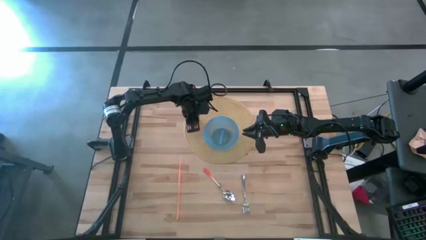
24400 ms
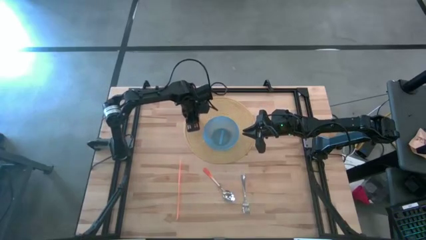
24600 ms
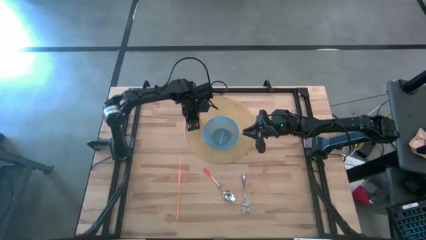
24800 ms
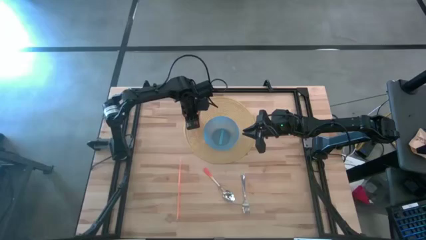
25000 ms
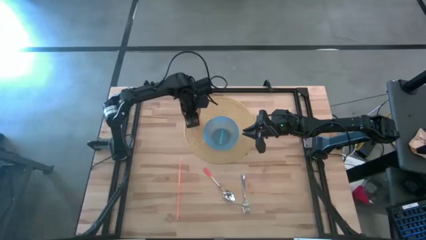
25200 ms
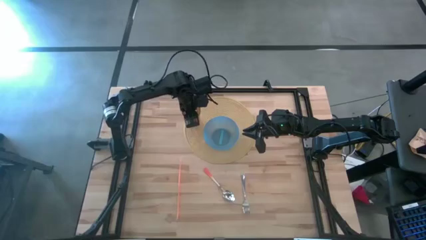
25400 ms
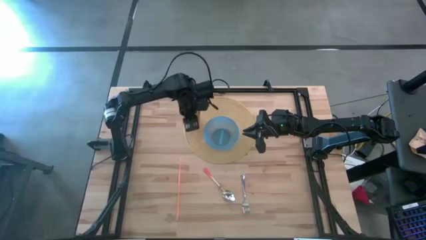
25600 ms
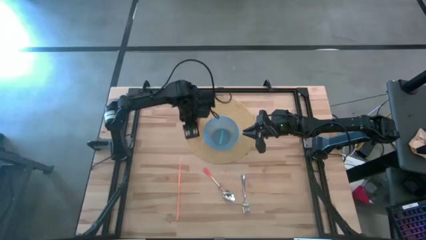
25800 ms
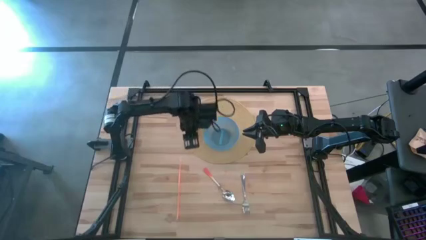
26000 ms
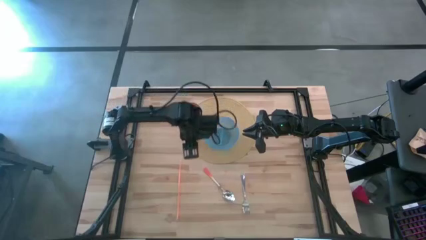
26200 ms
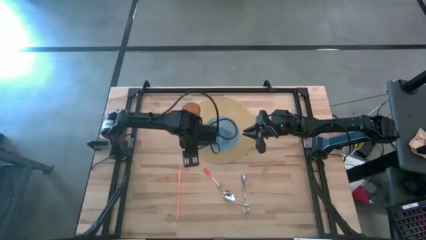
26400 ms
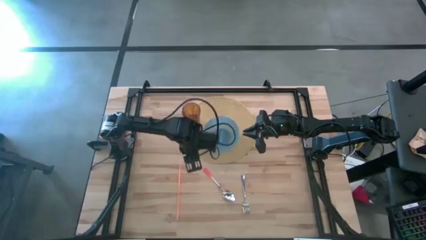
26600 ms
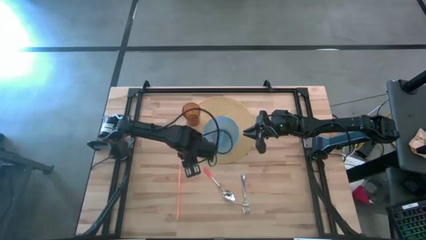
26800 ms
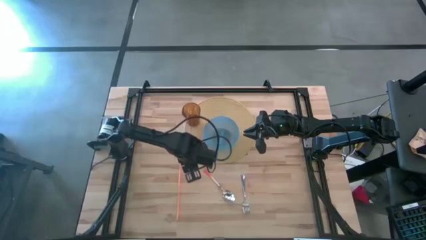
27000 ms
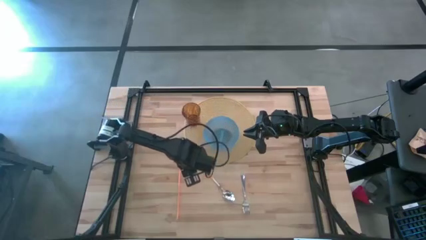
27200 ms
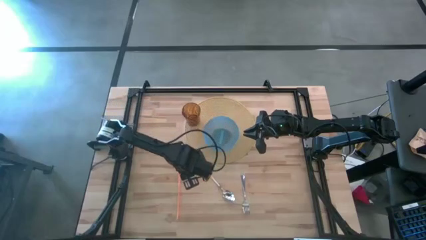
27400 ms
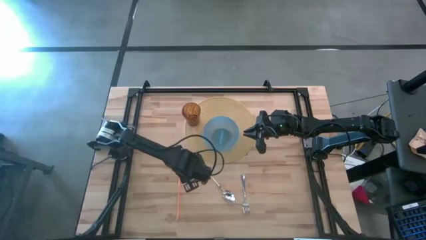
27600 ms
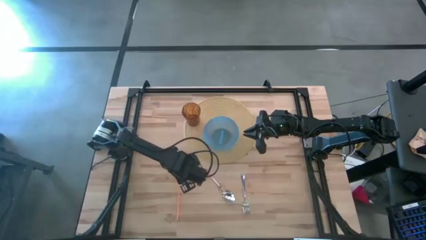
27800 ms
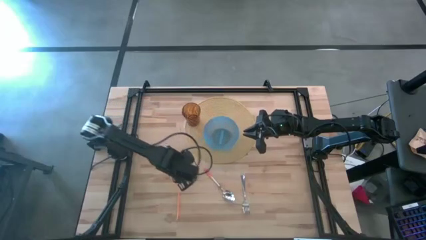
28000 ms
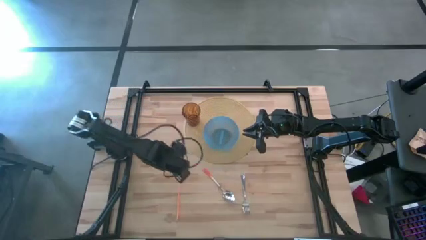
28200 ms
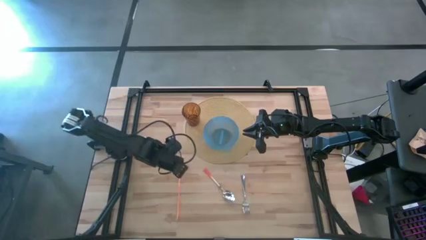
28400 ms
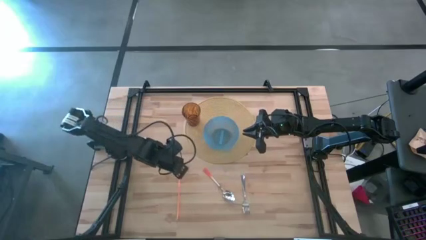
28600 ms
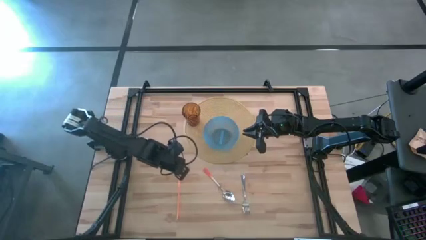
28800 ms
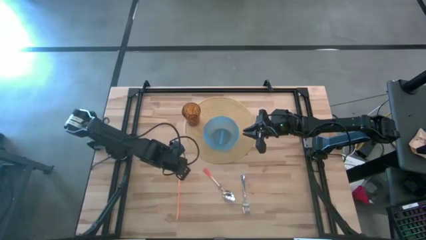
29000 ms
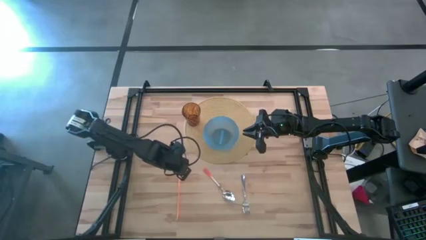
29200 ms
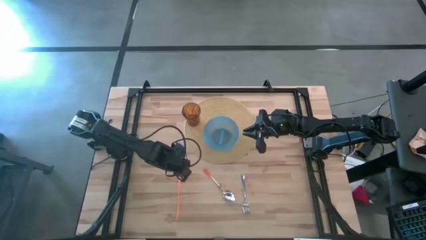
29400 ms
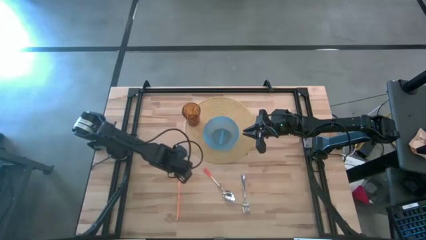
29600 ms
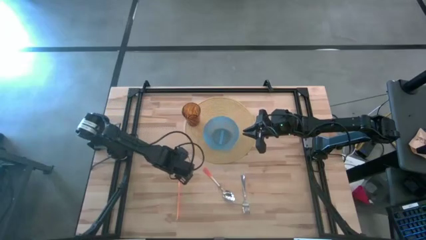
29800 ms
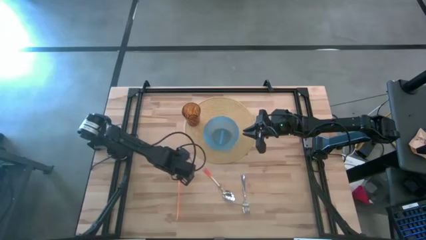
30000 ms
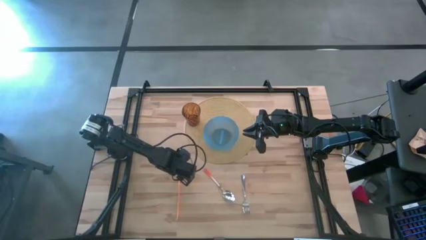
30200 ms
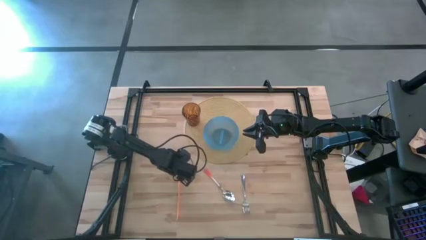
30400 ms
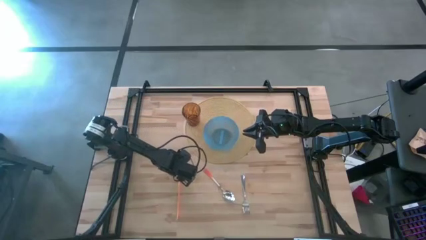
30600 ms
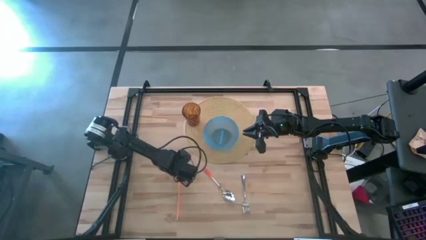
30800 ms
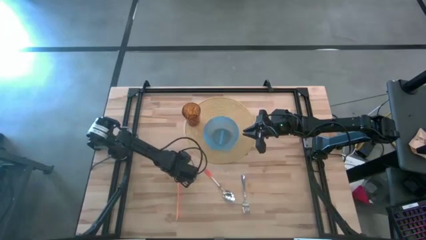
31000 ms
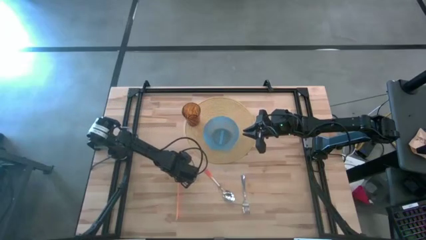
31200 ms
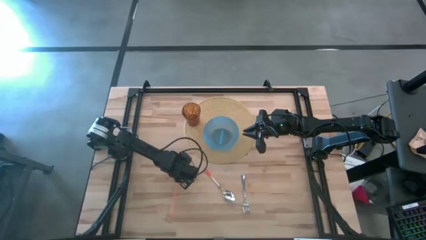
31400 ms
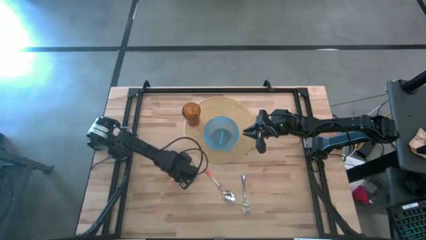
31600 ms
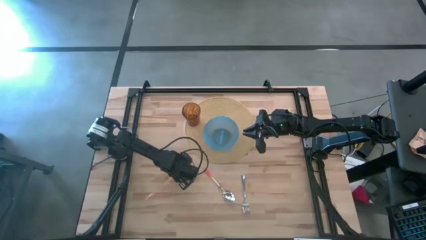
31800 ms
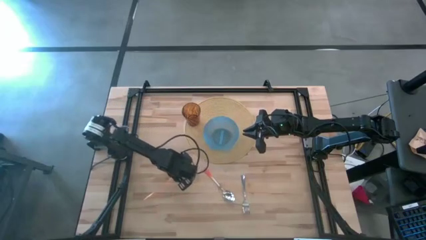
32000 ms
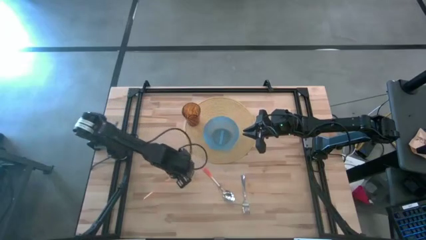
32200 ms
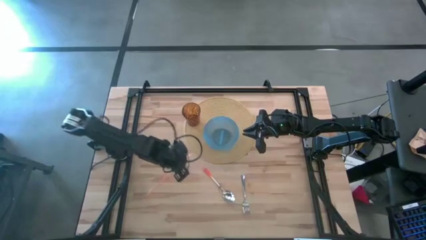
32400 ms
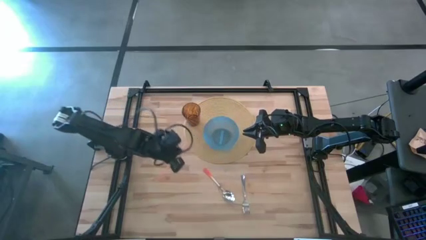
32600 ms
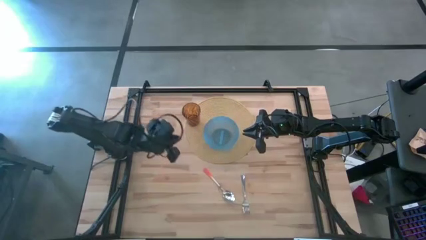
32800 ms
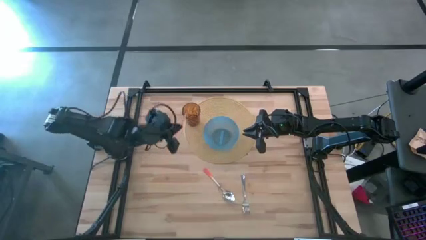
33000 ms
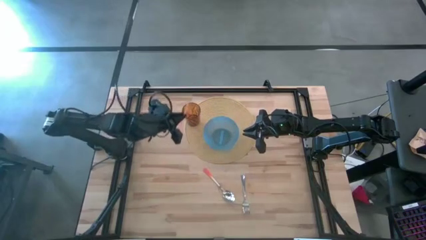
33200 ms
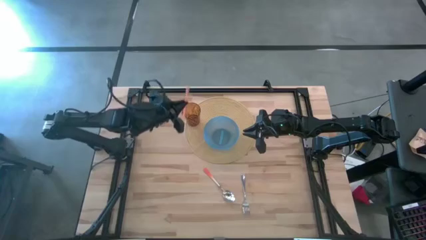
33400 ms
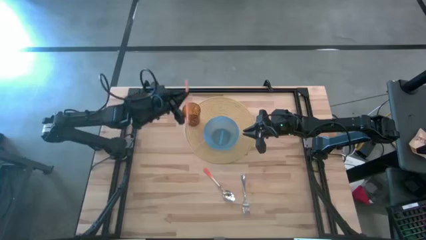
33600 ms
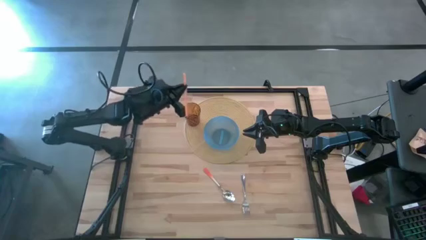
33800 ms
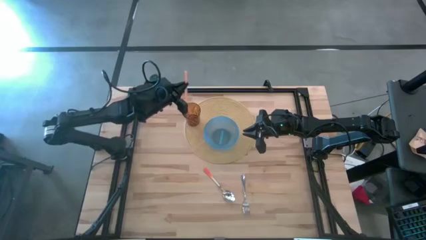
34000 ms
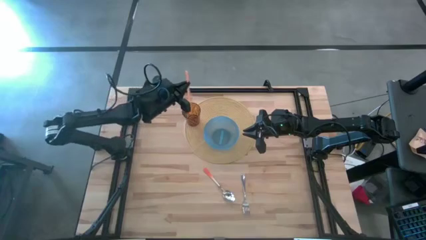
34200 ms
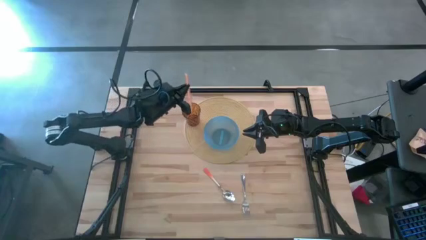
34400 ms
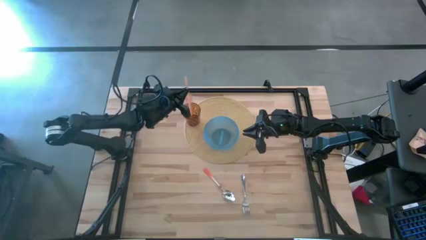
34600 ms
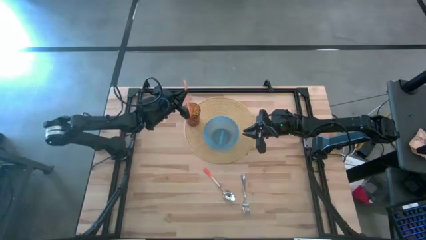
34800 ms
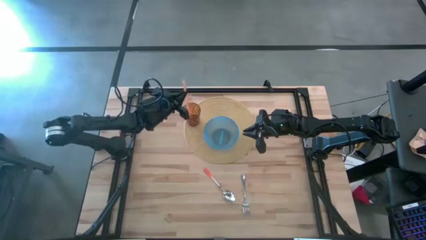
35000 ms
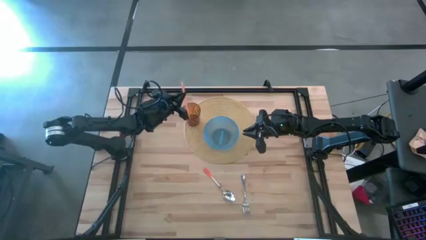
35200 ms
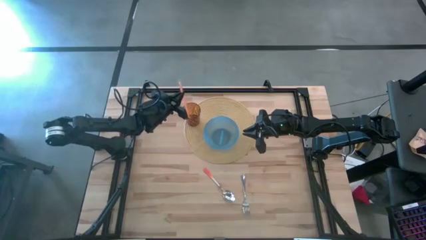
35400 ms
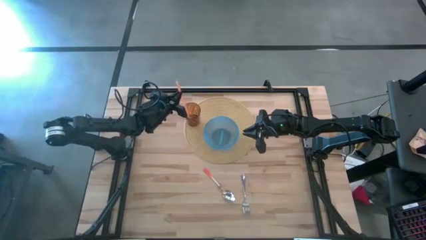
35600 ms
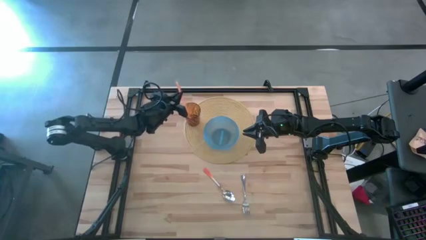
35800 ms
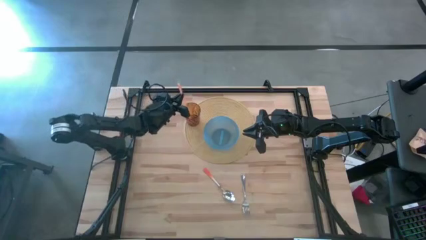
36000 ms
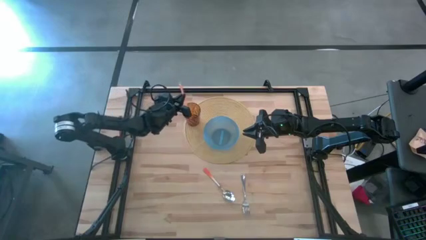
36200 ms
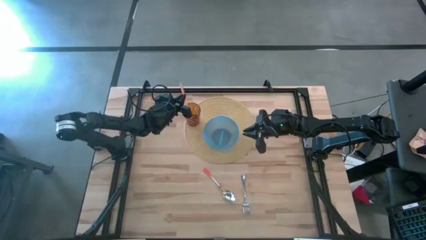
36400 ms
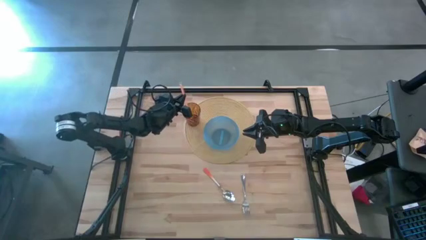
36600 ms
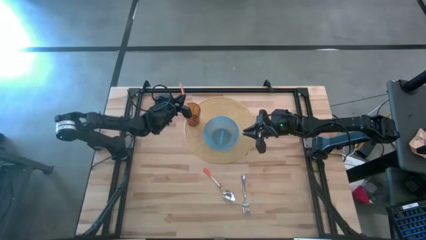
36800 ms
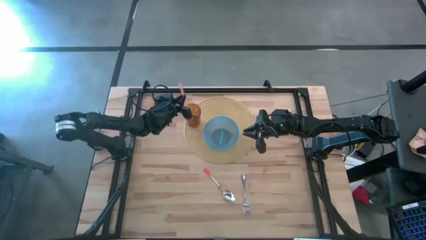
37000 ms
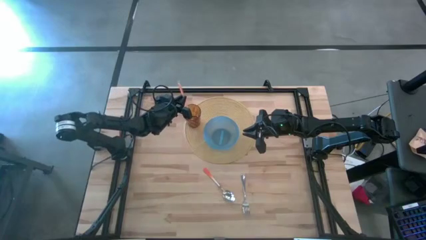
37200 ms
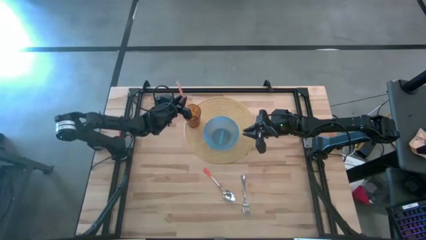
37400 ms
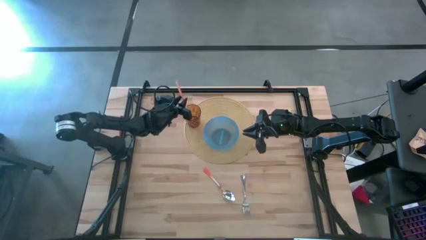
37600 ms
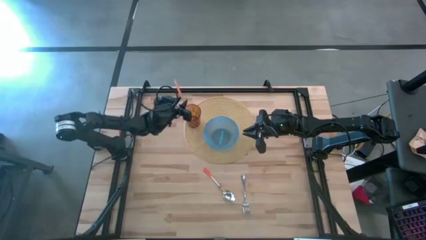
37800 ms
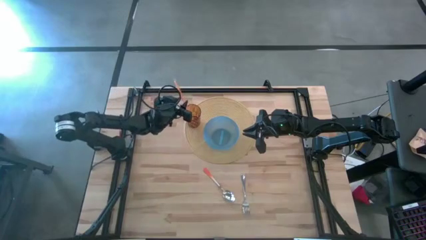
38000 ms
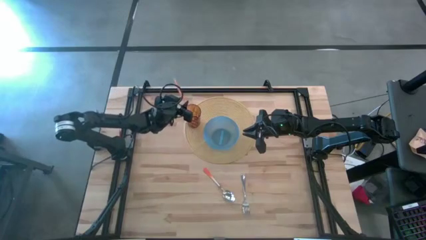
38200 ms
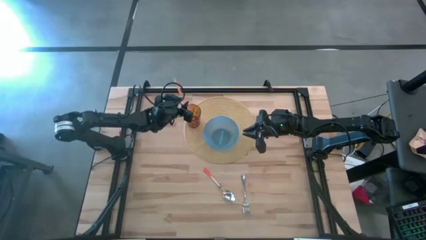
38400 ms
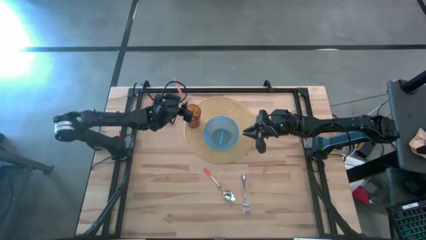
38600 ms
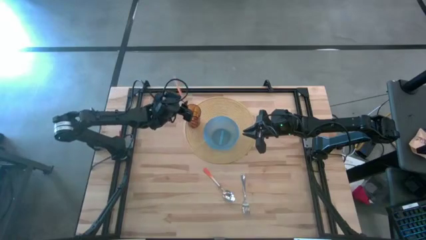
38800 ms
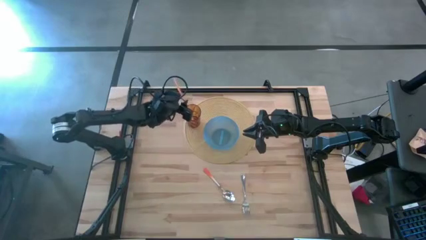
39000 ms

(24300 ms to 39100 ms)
Task: Pick & Place Utensil
Put the orange straw into the brown cup on the brown mat

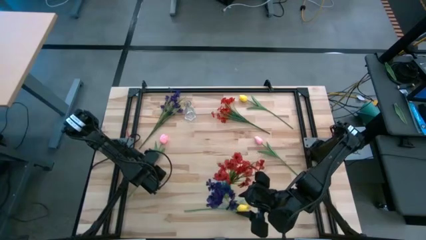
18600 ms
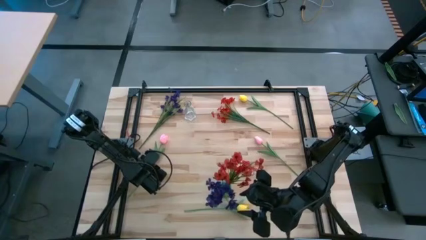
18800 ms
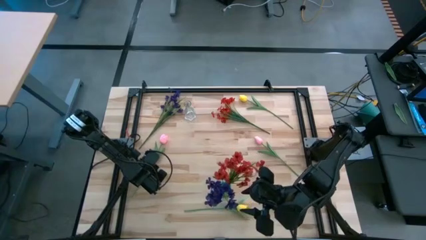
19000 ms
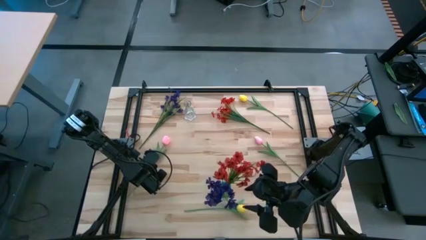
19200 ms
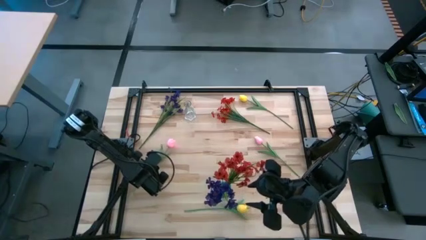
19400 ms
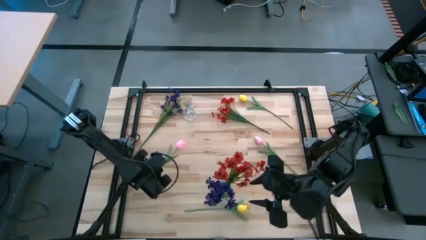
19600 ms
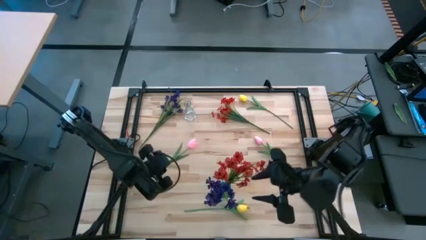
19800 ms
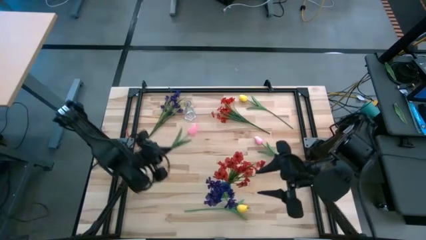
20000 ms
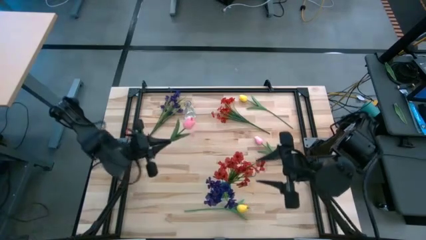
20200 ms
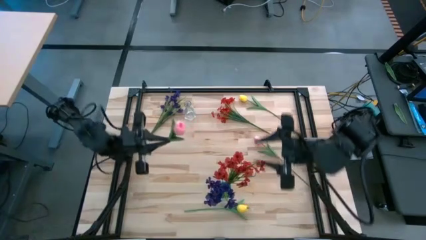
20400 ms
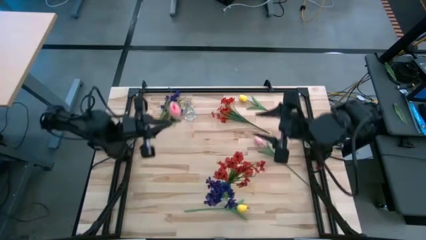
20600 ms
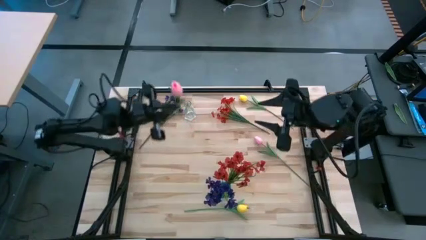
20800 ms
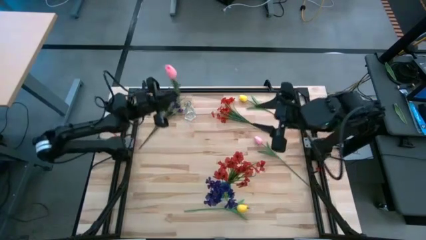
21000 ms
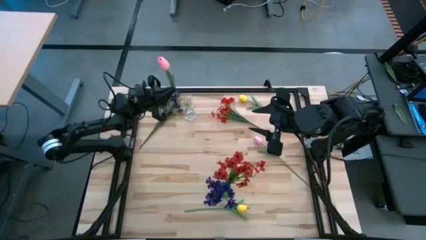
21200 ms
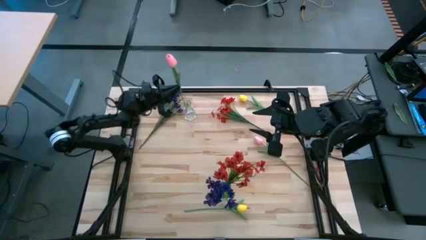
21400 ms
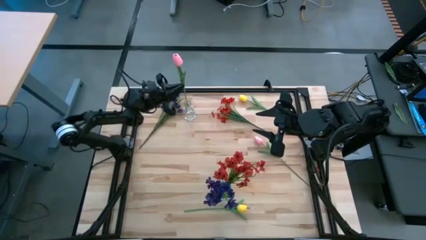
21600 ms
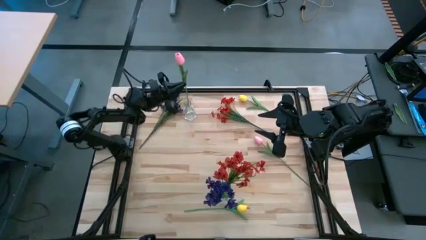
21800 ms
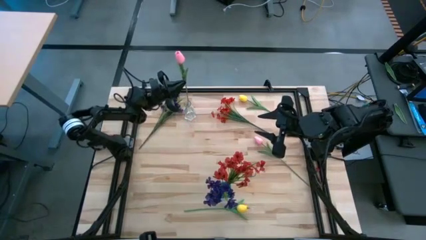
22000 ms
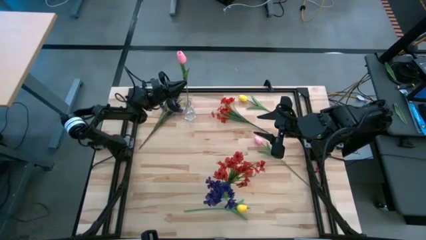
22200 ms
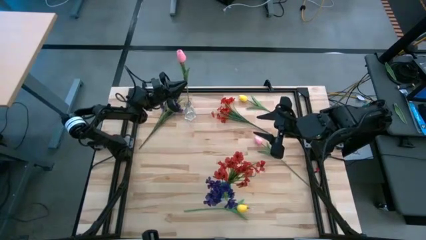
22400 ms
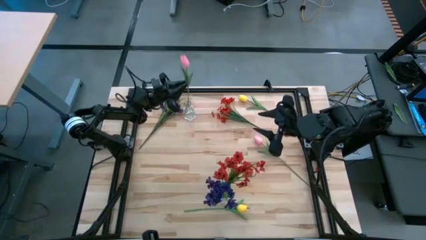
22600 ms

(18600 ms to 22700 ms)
Task: Sort flowers into vase by color
Put the left pink flowers into the transparent vase
